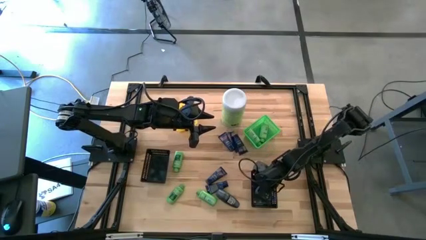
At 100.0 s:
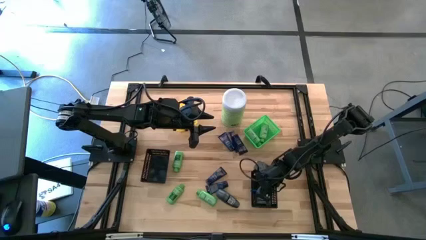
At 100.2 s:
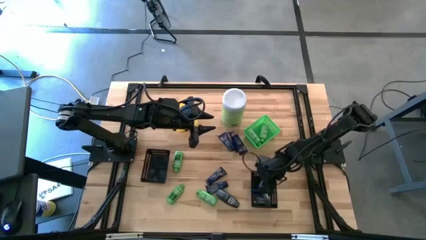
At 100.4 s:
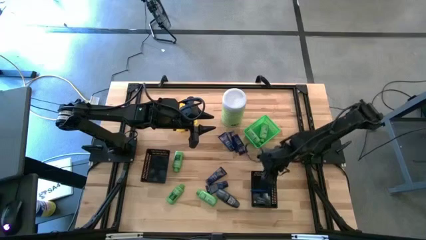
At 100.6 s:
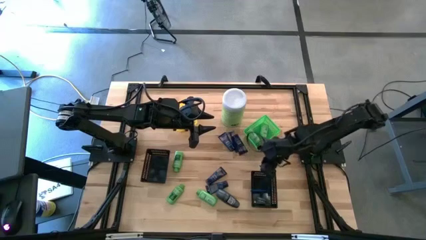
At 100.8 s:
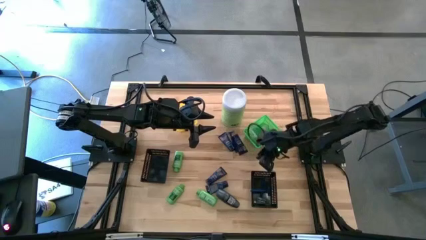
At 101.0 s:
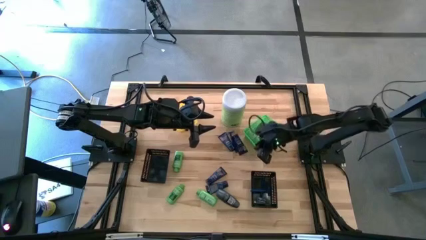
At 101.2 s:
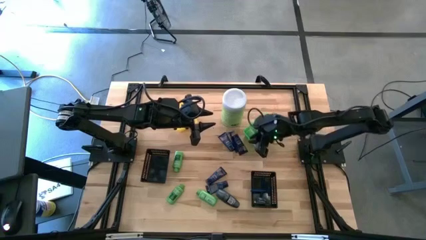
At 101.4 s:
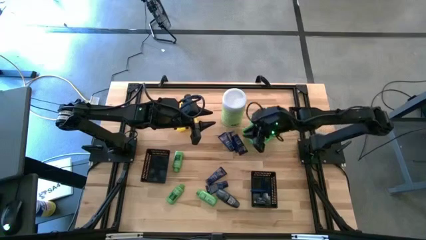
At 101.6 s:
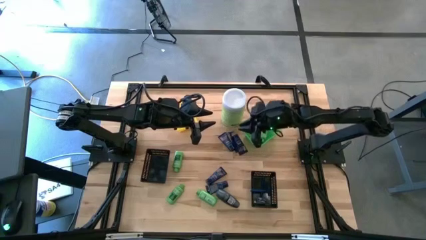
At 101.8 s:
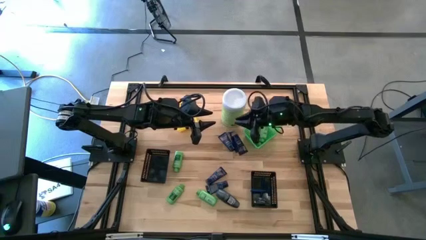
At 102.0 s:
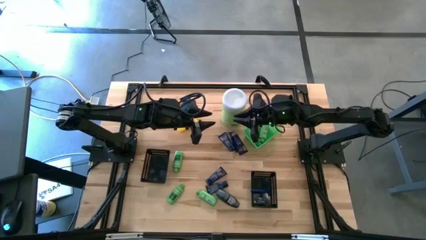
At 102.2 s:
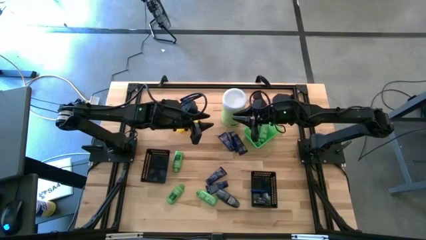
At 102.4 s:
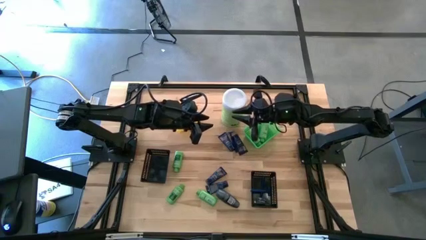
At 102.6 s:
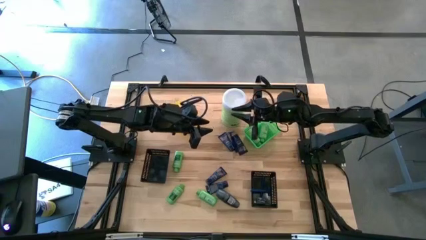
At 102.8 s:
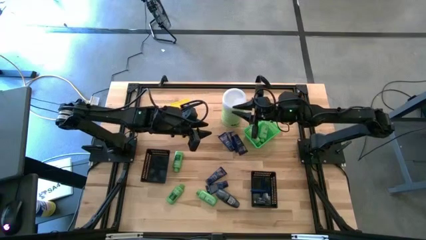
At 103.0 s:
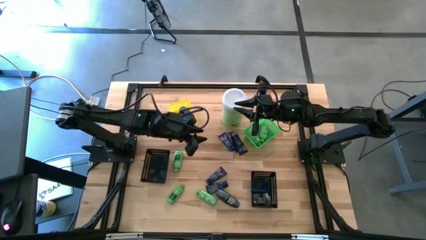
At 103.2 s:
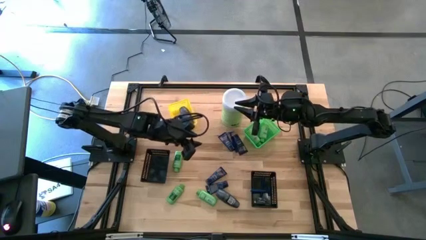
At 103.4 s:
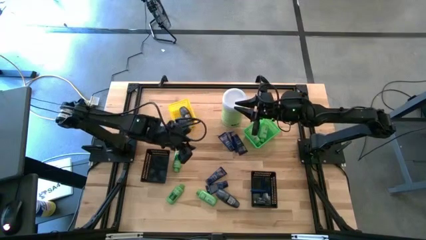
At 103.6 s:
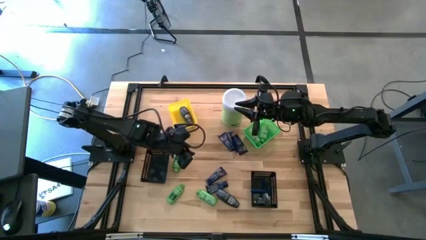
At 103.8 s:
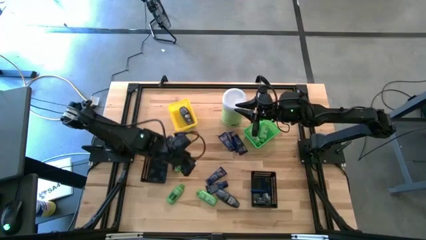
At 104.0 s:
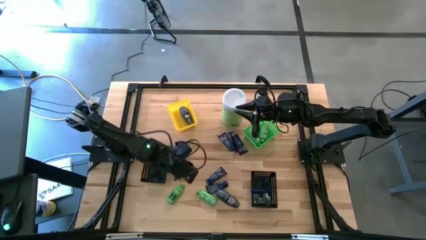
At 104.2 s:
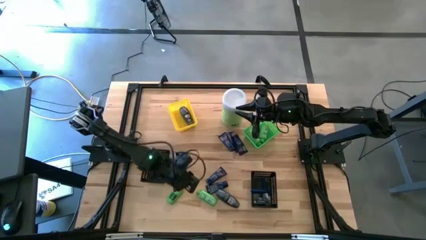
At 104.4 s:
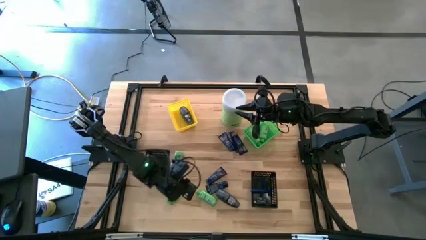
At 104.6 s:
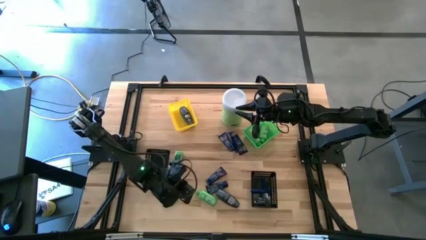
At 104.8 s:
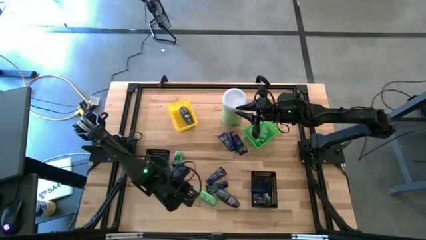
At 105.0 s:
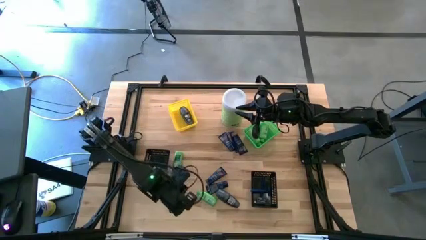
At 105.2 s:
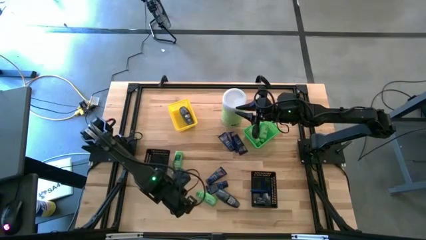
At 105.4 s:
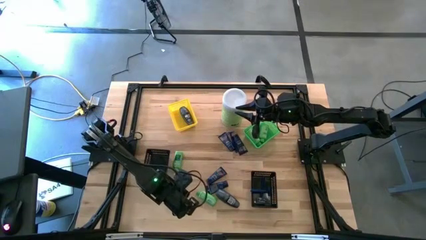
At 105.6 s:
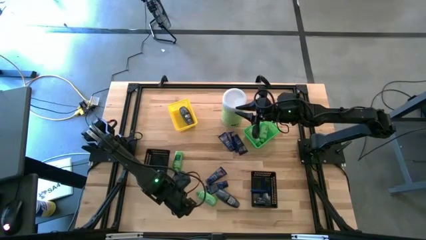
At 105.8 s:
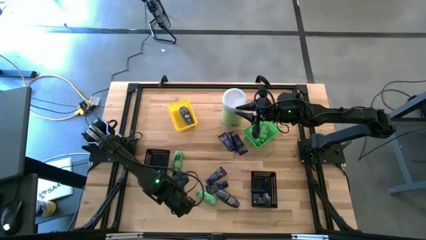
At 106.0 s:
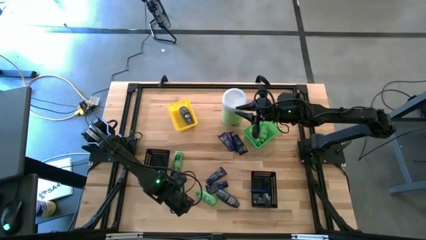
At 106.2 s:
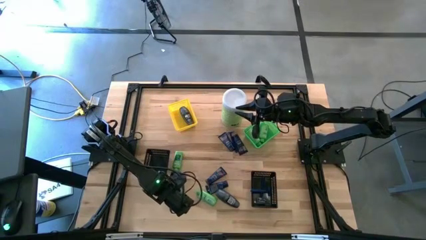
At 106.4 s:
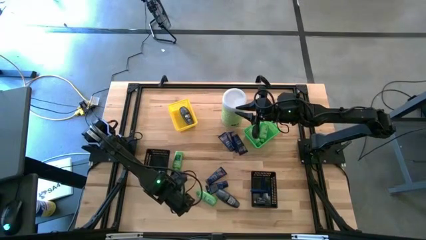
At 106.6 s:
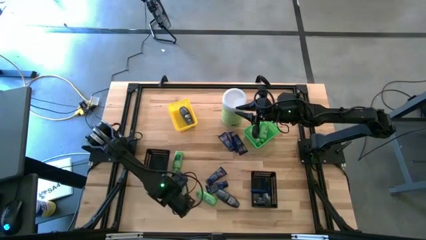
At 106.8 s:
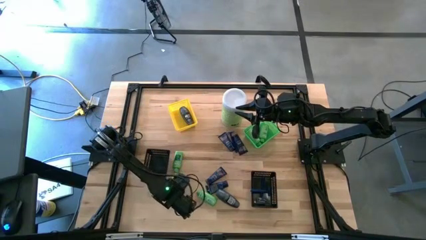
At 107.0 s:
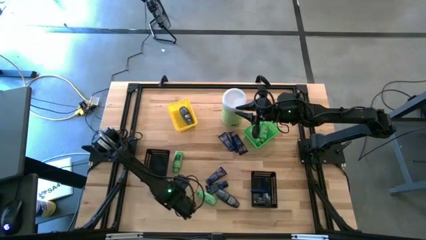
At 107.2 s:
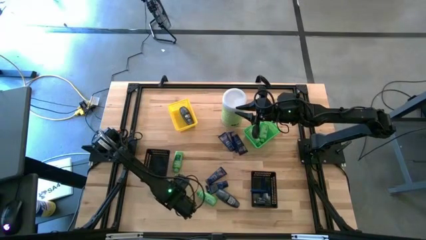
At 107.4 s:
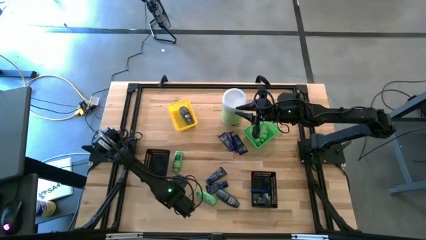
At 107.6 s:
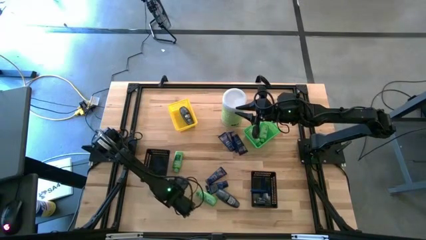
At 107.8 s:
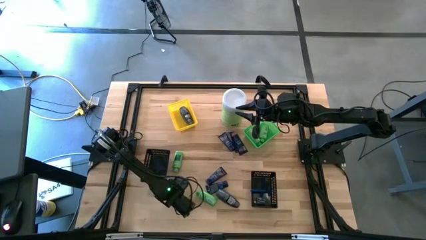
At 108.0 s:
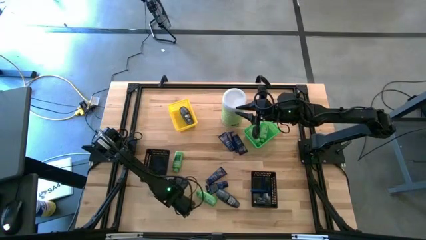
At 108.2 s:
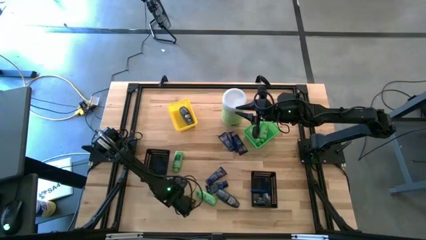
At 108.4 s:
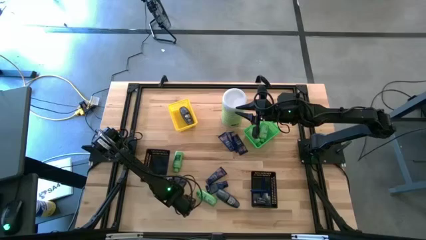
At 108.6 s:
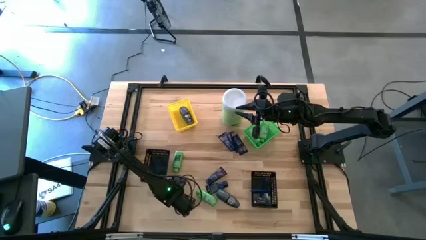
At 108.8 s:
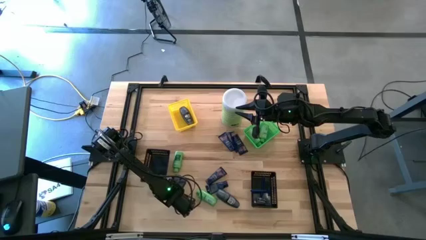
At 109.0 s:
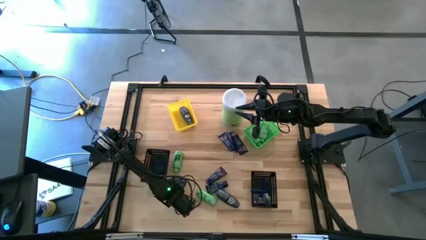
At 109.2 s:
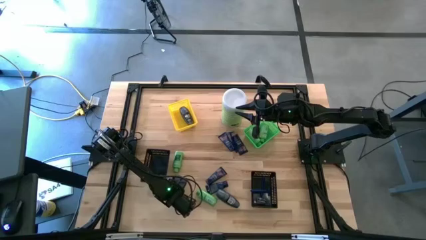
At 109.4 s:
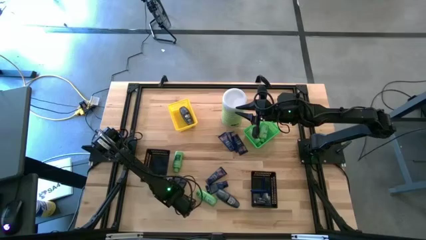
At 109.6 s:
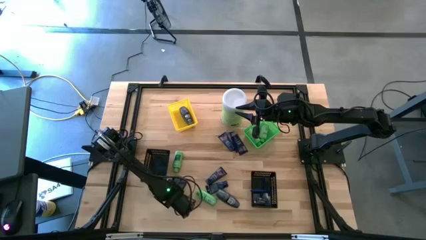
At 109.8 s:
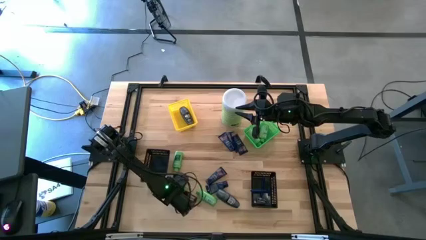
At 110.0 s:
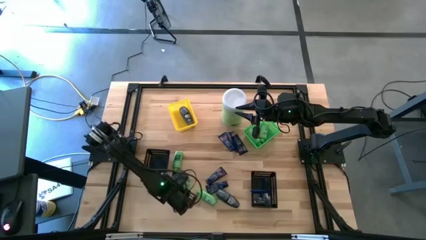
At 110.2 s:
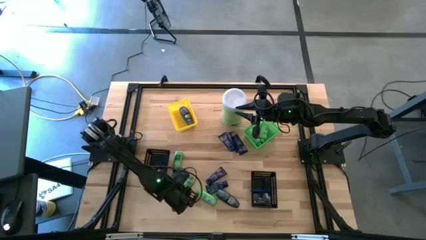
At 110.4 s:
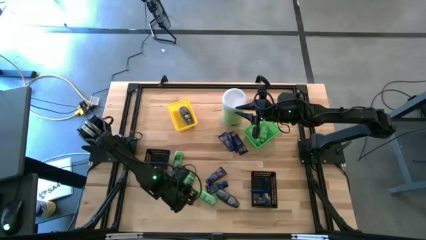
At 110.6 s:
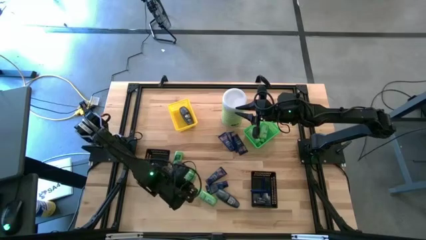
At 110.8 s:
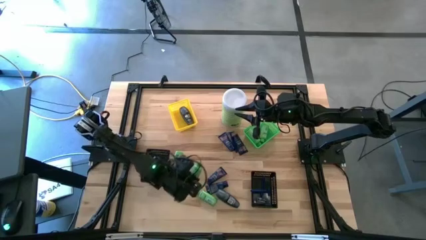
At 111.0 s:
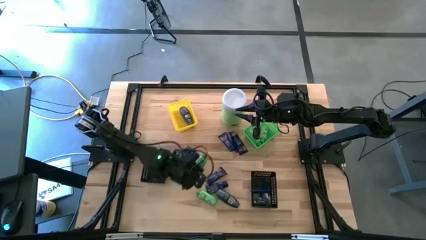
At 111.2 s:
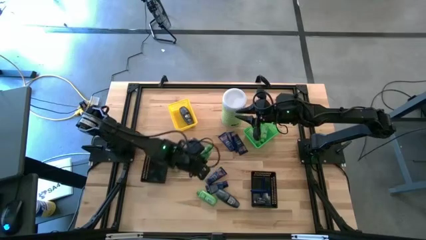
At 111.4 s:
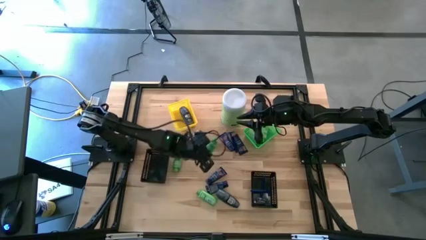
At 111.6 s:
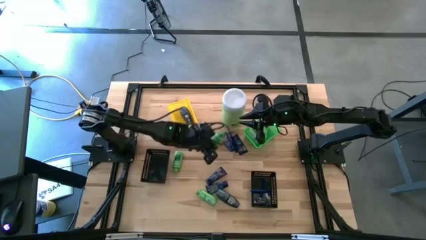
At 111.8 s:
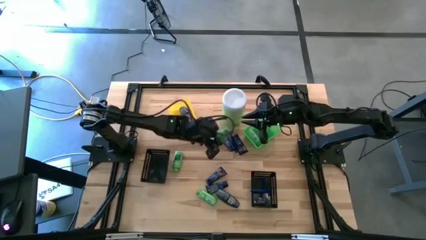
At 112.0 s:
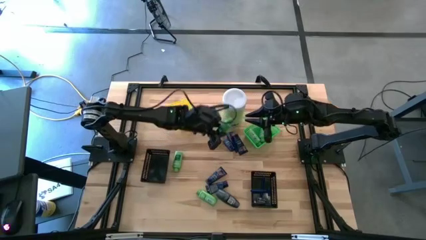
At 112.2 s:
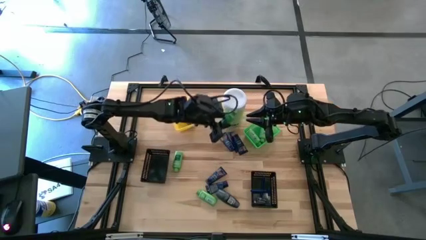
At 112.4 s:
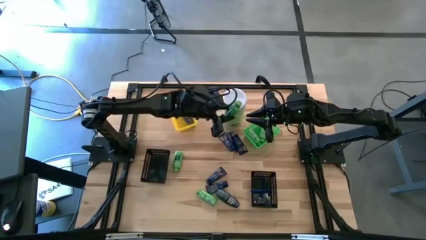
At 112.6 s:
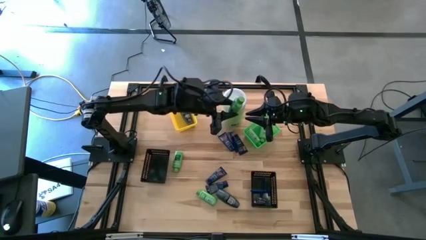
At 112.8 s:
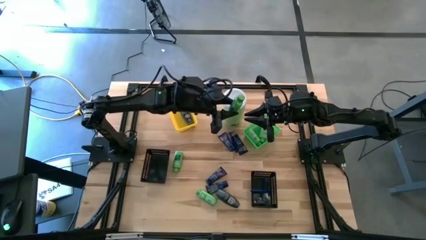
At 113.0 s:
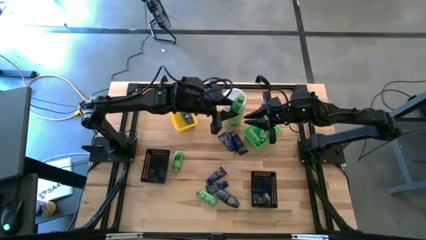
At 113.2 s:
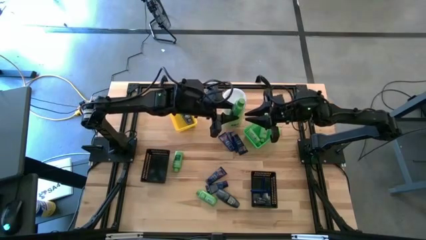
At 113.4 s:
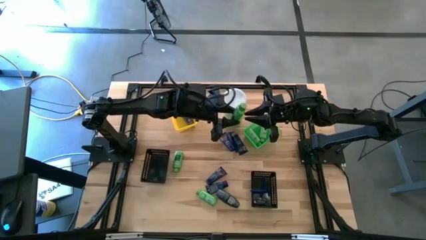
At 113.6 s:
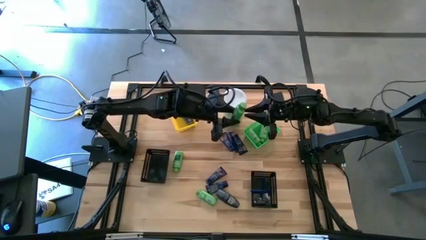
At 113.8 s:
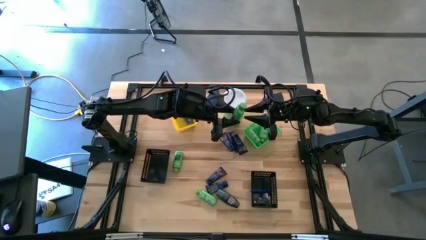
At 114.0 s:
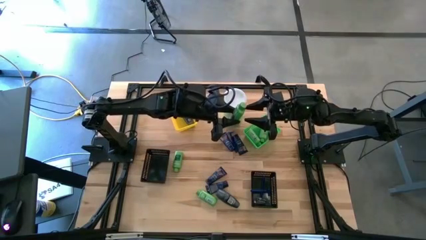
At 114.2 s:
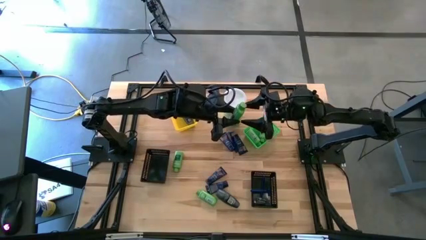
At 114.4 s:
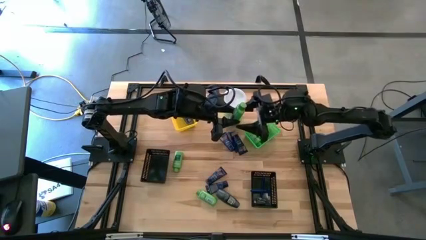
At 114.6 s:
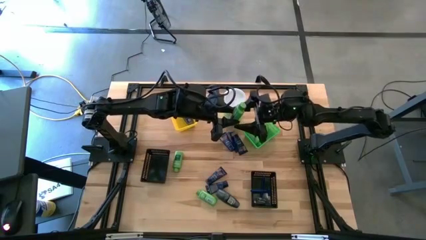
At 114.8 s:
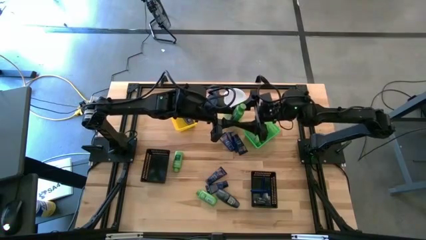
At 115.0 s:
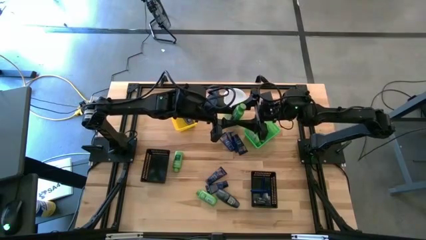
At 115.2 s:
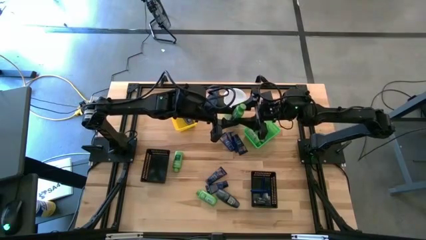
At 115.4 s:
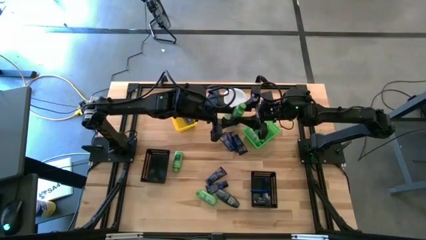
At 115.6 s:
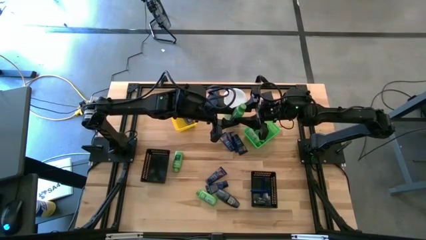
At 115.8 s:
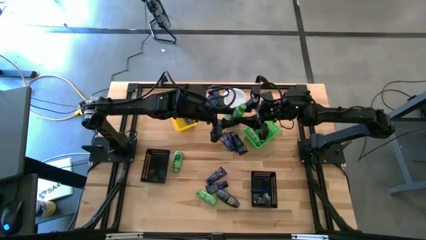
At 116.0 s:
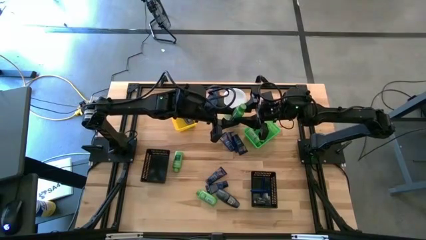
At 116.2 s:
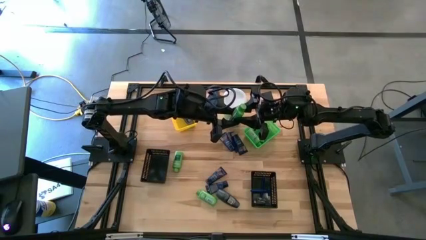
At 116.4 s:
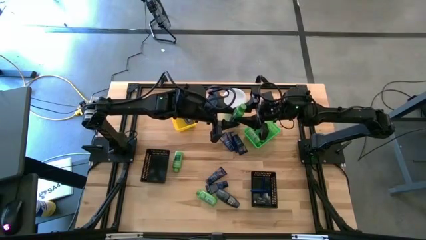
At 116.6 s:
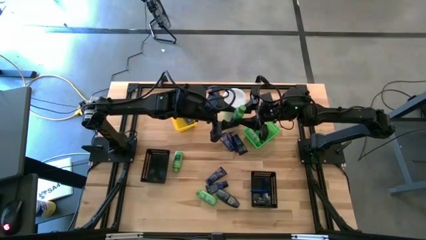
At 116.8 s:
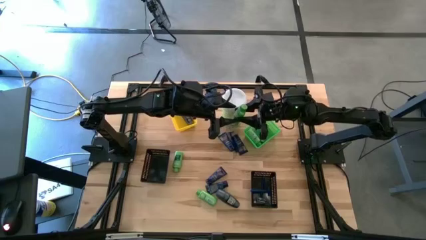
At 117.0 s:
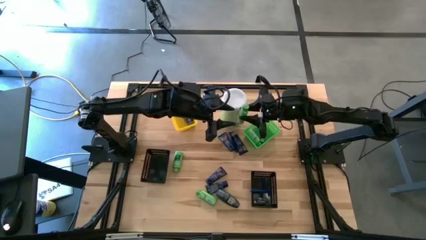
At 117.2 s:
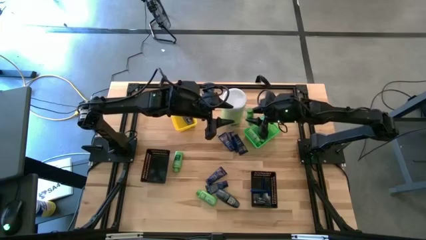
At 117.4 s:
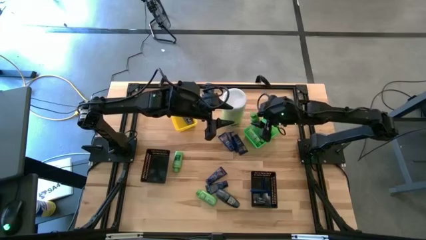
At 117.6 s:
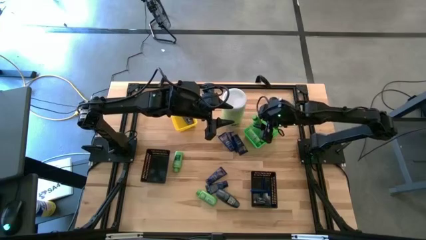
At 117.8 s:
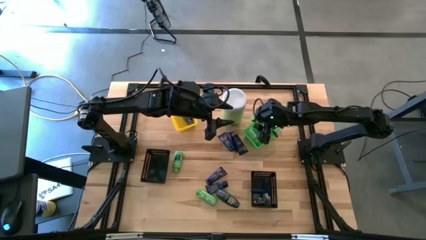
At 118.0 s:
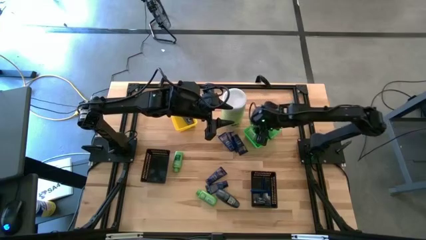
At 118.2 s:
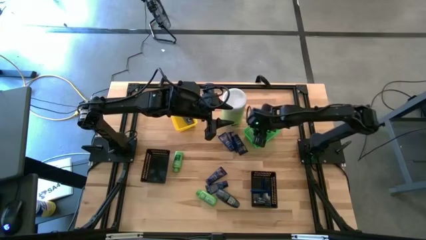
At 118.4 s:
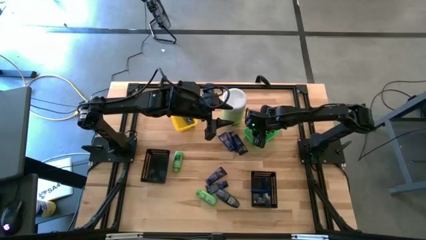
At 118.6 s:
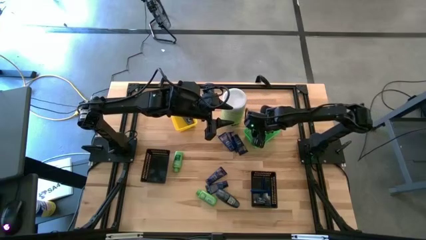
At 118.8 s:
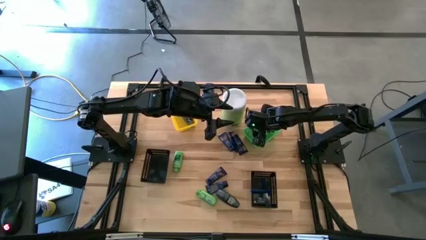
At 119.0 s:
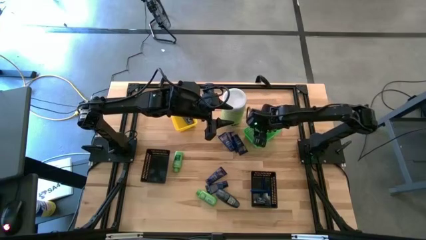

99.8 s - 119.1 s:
Task: Pick & Place Travel size toiletries
Put the shampoo bottle bottle into the green bin
